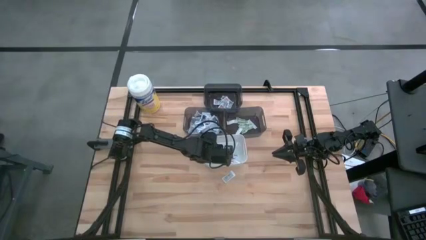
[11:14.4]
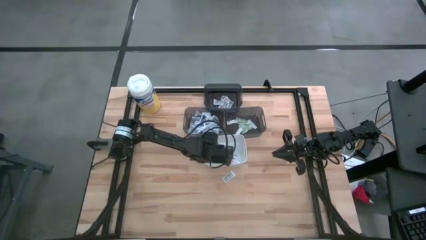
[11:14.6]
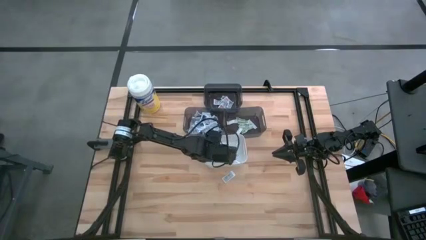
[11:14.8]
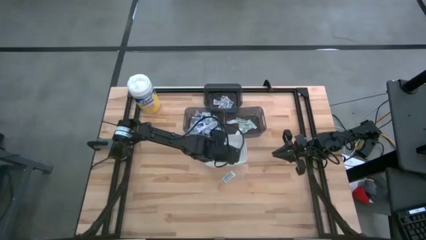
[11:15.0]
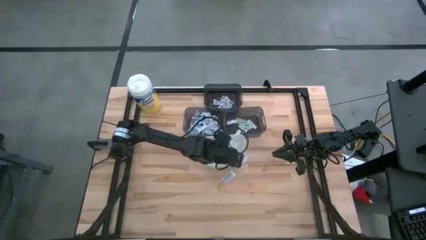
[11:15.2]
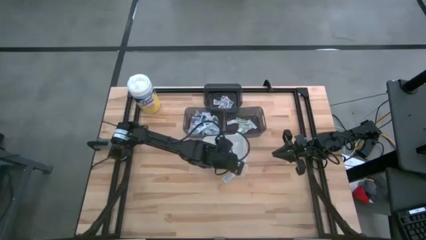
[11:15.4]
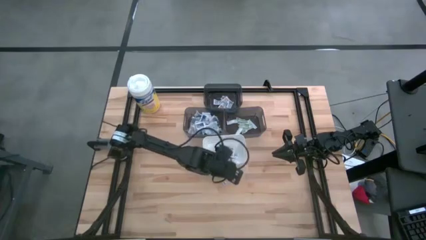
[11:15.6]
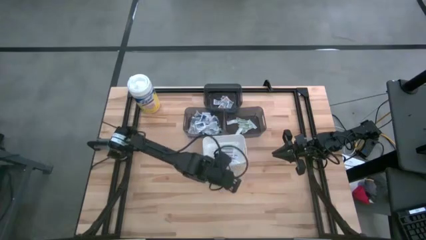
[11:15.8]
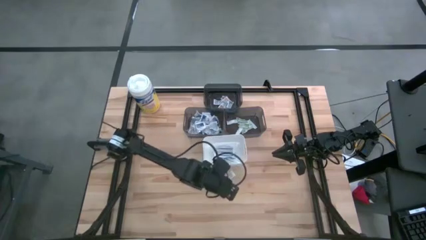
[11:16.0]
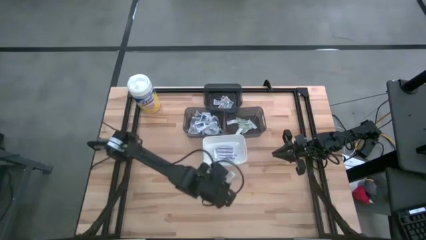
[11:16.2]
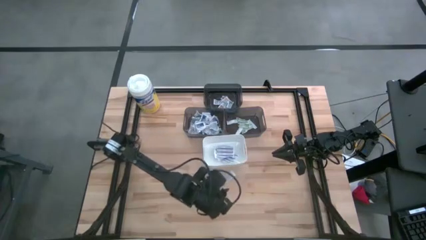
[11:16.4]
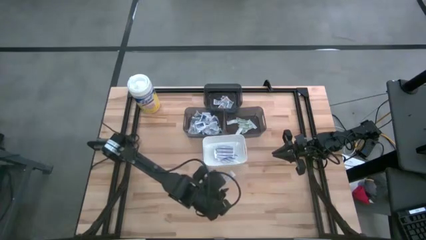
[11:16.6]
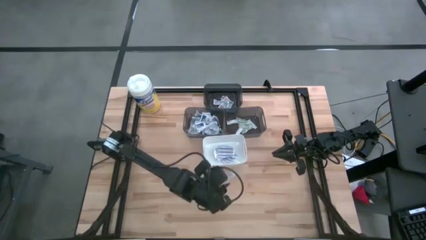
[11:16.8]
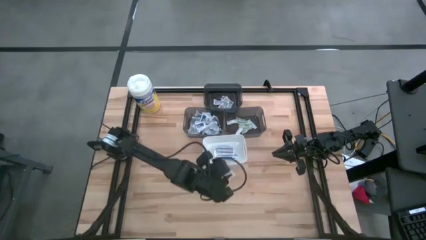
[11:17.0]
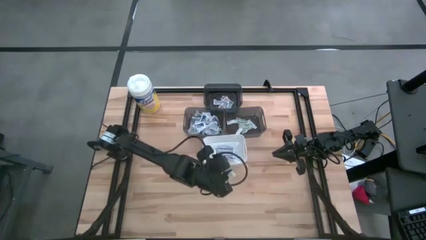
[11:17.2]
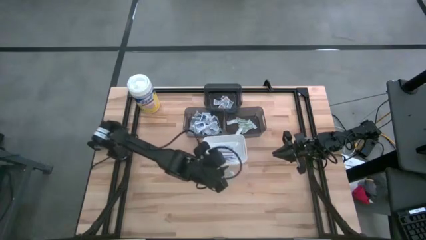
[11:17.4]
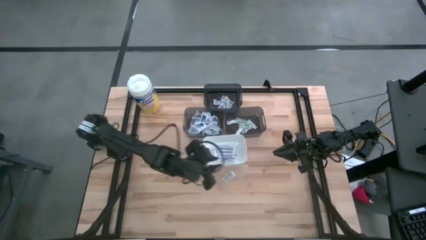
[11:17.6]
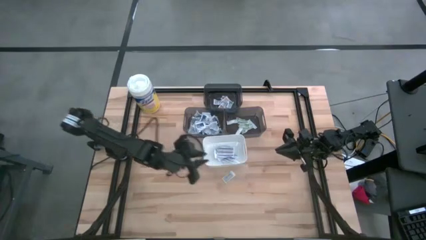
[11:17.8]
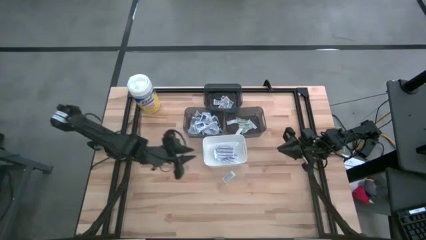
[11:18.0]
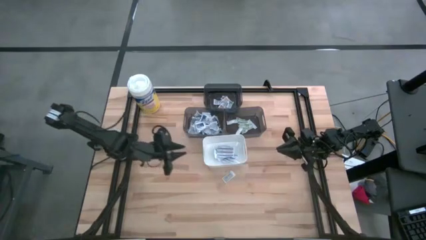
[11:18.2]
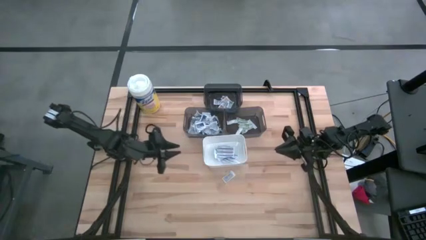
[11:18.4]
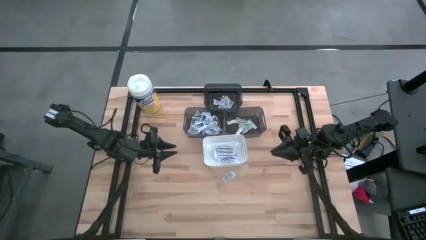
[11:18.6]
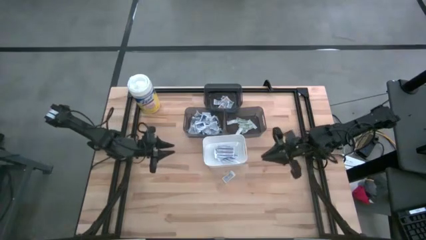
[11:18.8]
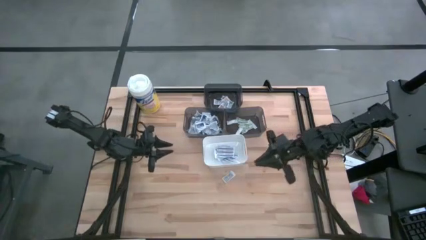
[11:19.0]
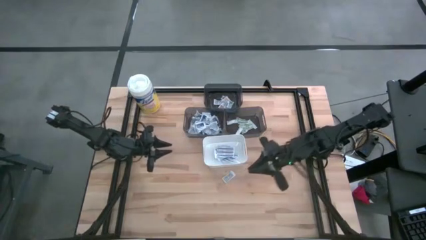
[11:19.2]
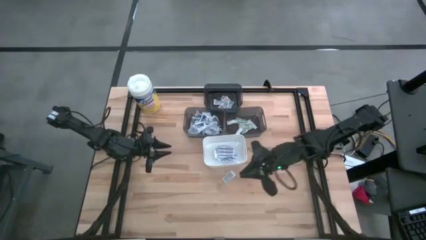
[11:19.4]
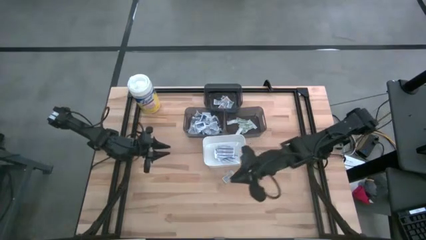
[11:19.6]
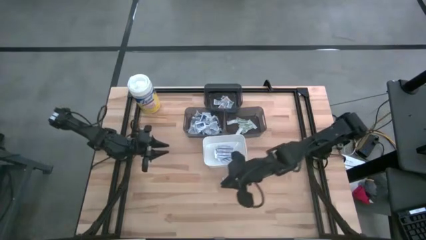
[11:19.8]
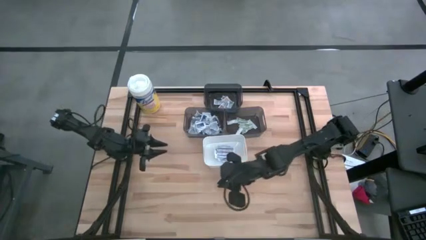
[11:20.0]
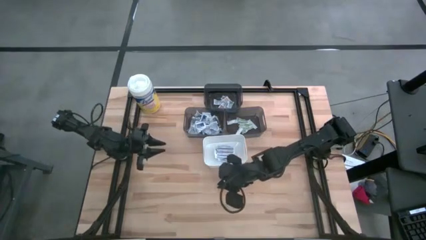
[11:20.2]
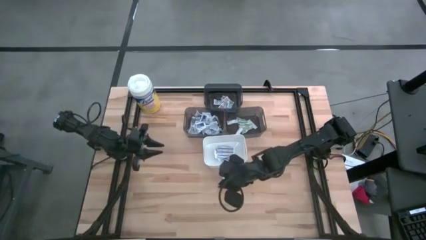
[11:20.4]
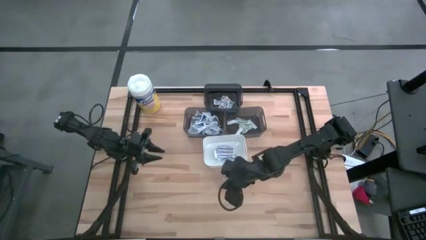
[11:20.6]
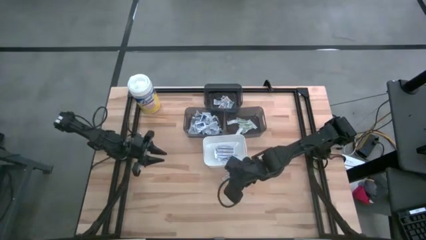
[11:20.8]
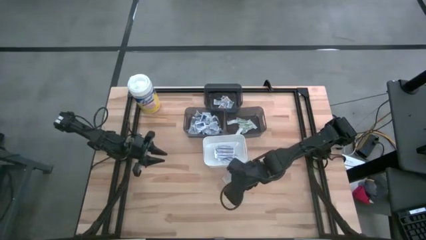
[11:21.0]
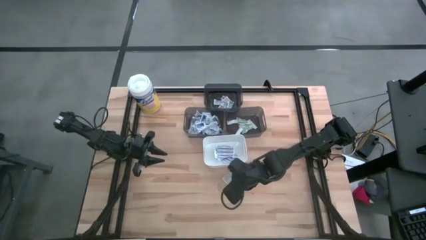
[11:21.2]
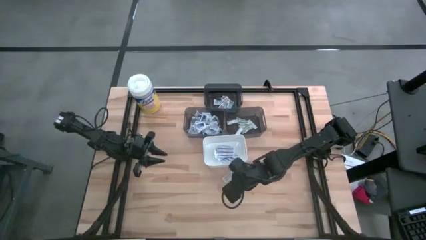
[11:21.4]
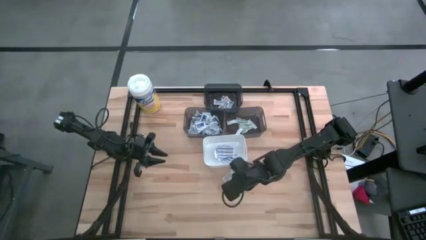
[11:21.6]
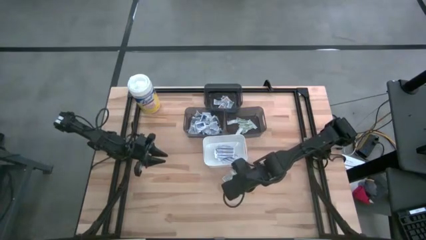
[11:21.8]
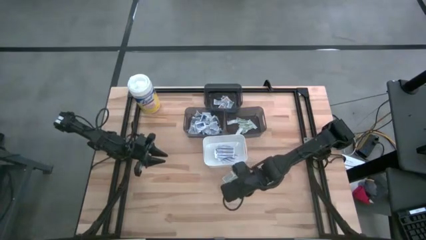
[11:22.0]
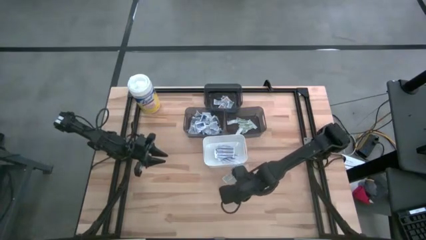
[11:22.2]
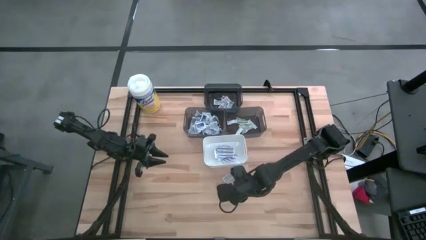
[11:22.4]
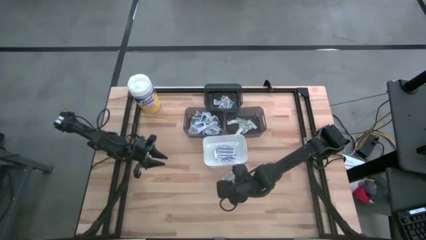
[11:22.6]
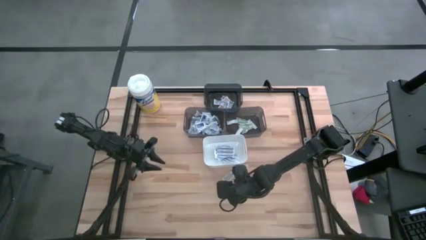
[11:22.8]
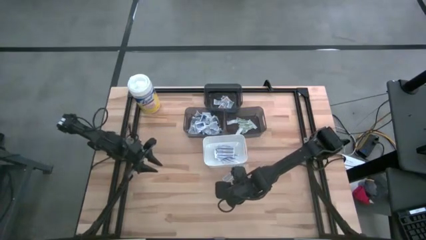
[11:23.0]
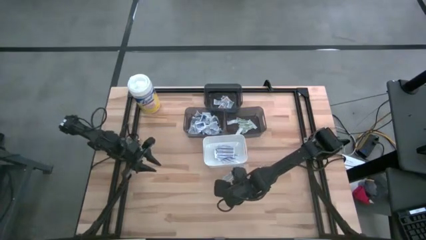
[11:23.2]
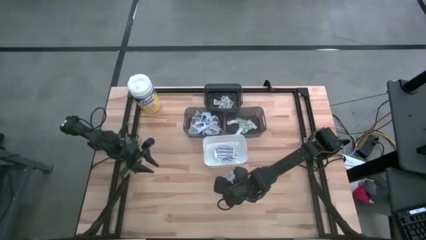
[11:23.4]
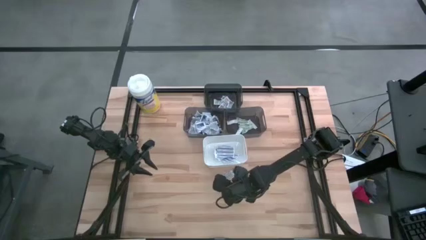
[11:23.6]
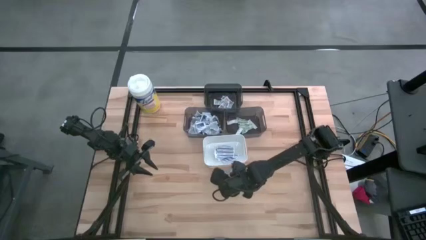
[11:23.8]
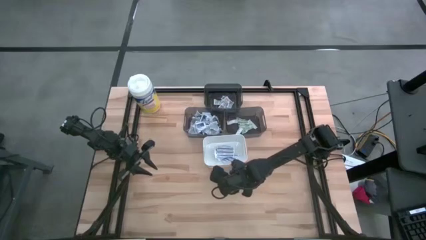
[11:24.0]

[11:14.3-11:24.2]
Task: Pick & Place First Aid Supplies
Put the ointment pack into the top black bin

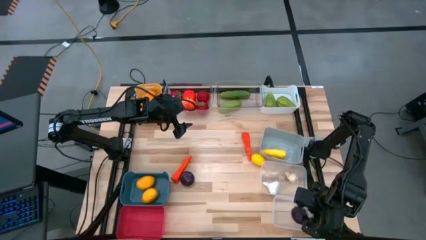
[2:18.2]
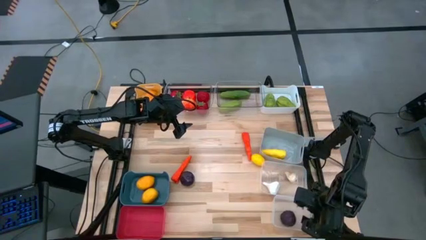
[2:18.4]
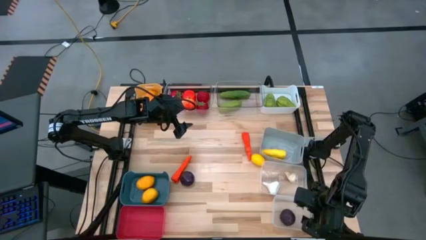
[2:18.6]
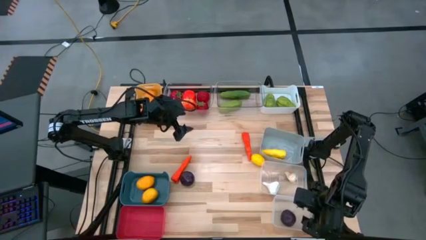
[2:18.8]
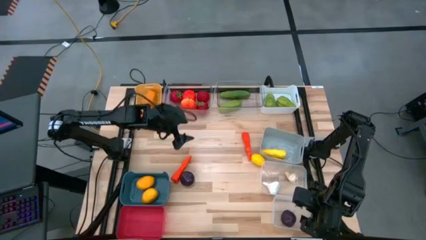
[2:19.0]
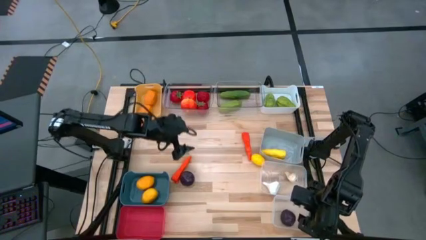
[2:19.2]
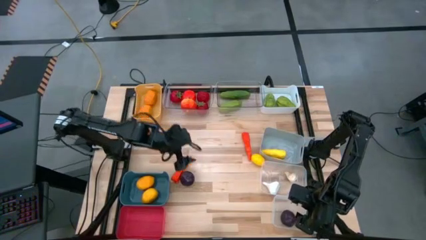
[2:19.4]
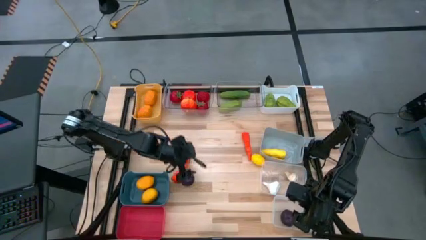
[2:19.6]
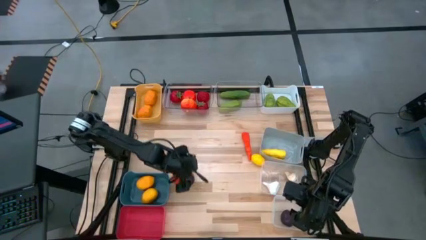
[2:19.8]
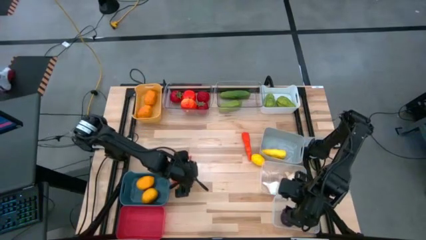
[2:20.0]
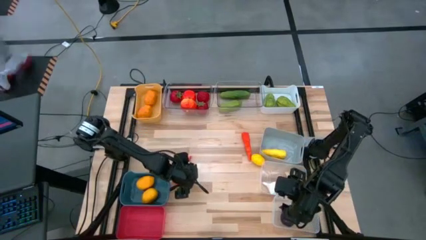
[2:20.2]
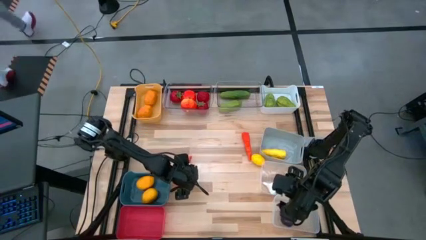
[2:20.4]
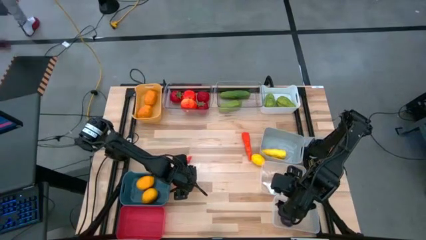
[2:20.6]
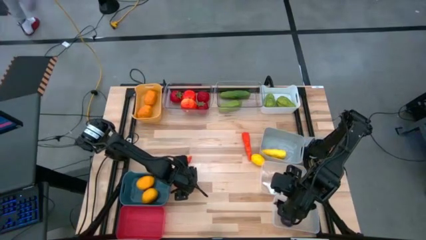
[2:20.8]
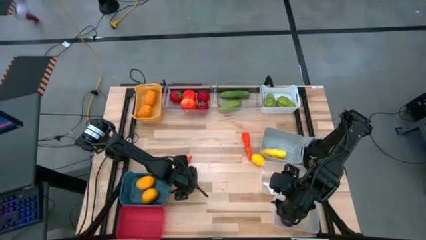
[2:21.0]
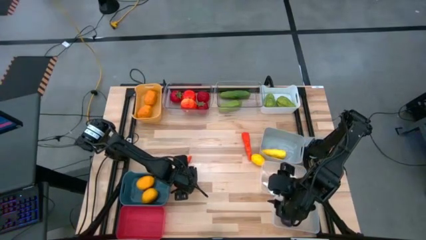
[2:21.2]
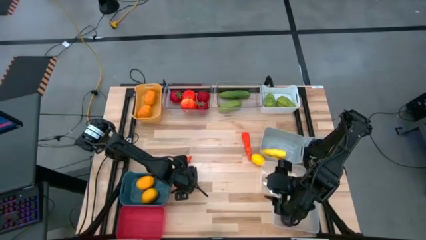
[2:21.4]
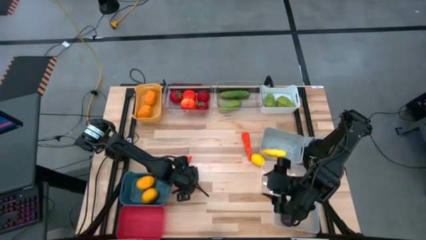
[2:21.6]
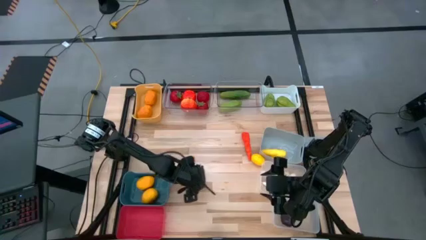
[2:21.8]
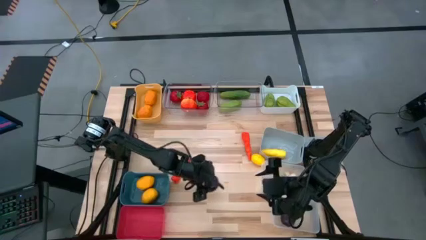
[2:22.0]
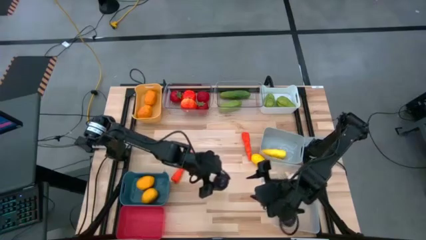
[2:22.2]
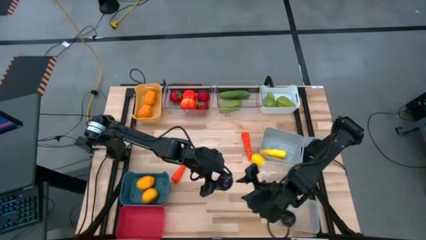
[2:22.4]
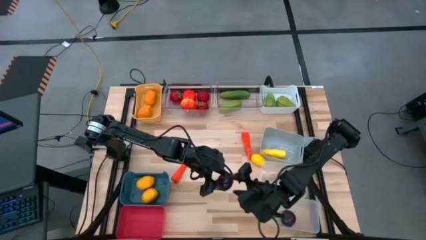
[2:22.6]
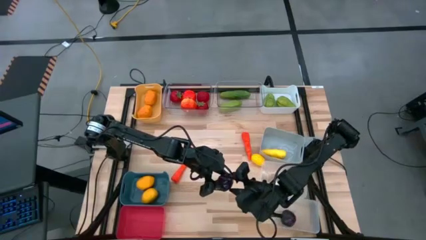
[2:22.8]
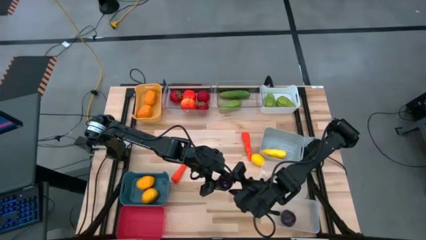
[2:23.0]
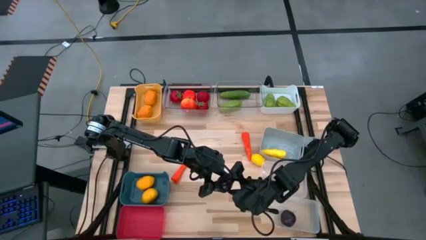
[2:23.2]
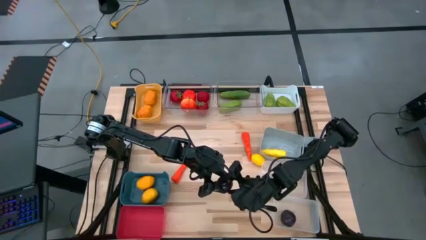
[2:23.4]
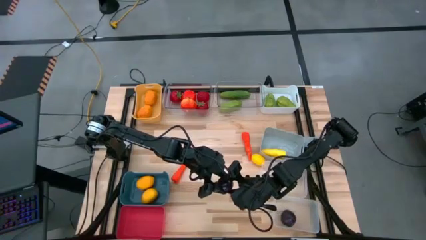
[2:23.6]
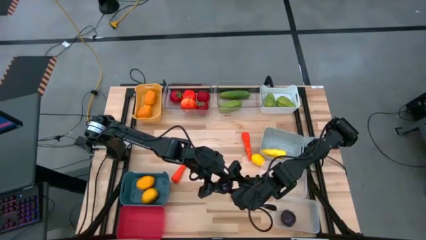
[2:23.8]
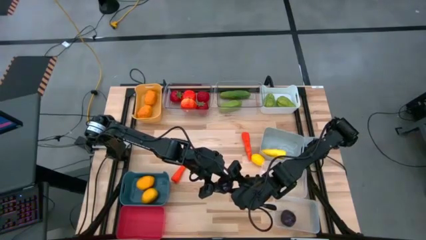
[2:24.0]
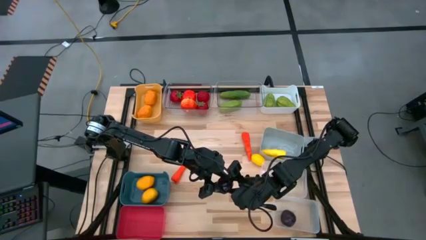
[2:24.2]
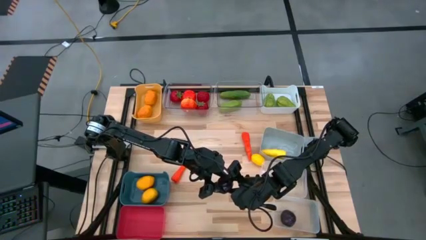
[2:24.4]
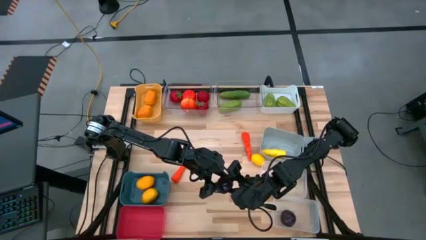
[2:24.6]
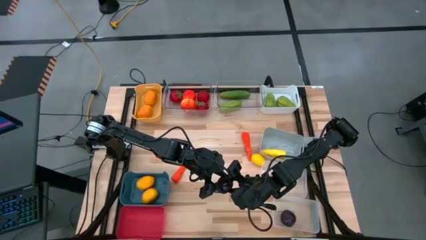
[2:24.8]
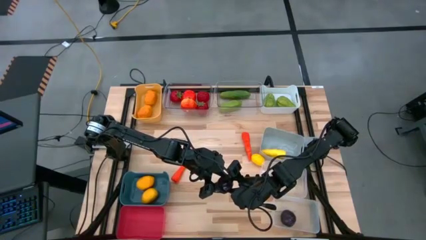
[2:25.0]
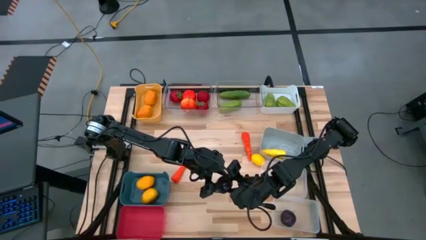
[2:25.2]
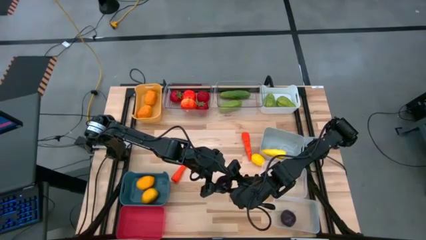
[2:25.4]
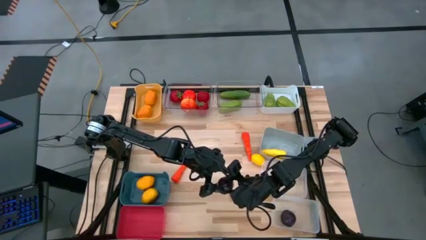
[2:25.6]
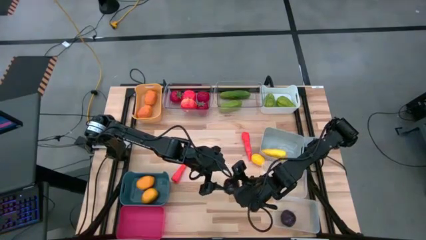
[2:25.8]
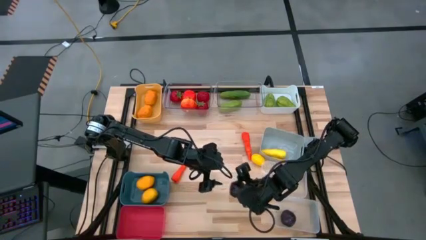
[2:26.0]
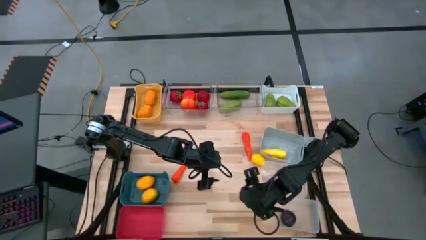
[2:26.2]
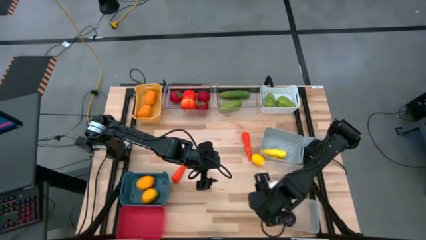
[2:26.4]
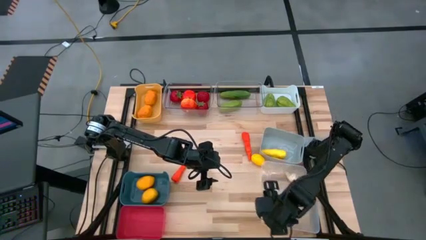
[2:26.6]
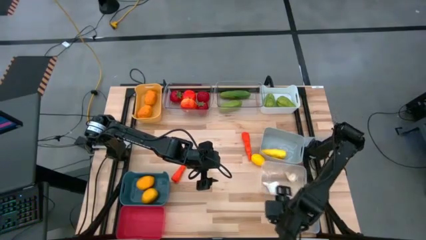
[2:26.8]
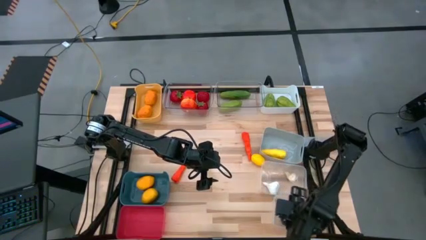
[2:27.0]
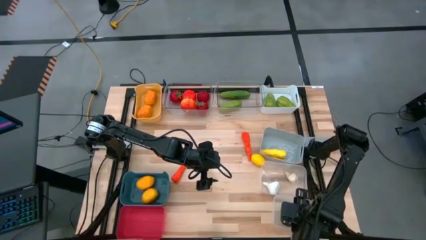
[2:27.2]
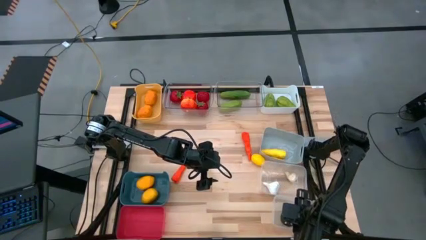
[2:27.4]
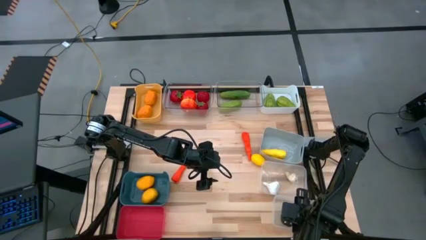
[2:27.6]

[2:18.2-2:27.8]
Task: Sort produce into baskets
Put the purple plum into the bottom white transparent bin
